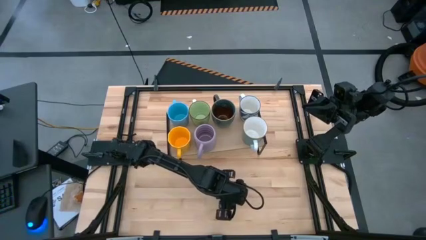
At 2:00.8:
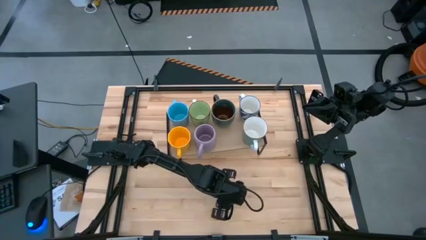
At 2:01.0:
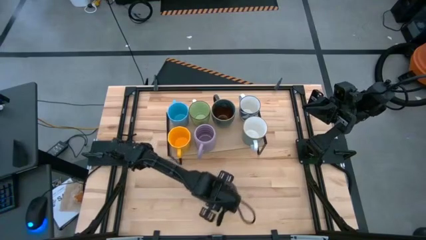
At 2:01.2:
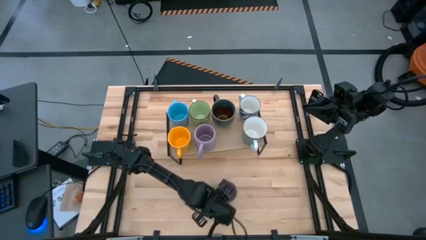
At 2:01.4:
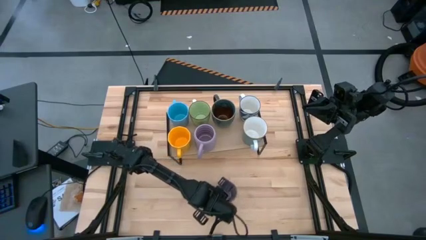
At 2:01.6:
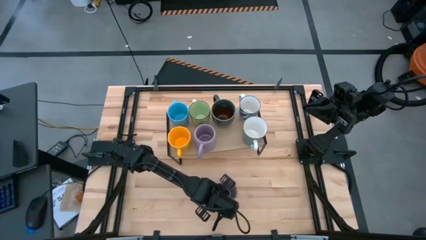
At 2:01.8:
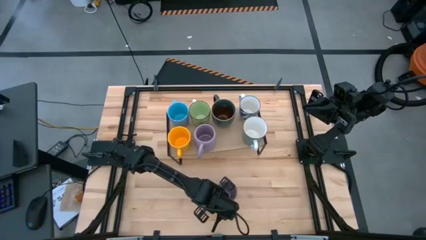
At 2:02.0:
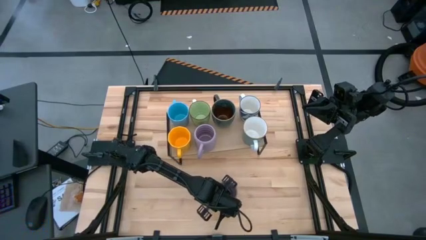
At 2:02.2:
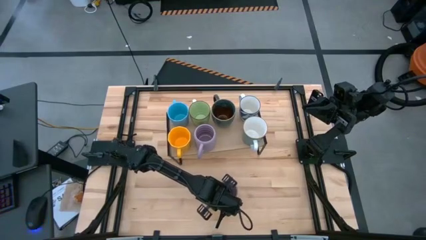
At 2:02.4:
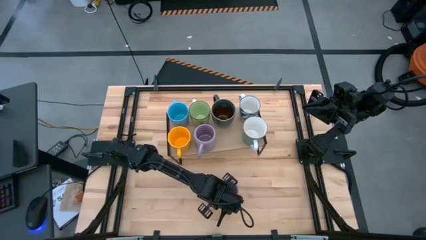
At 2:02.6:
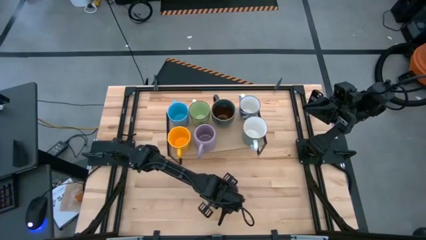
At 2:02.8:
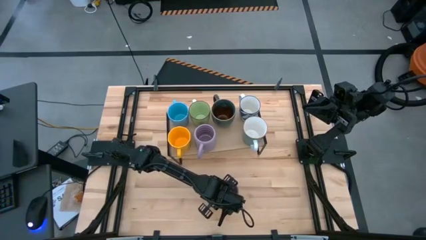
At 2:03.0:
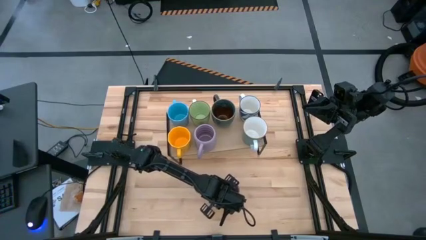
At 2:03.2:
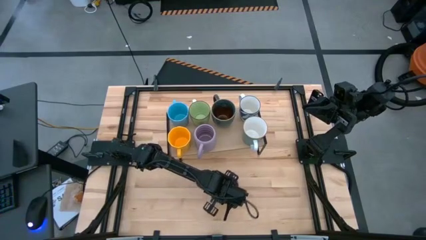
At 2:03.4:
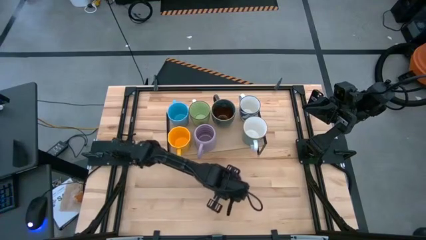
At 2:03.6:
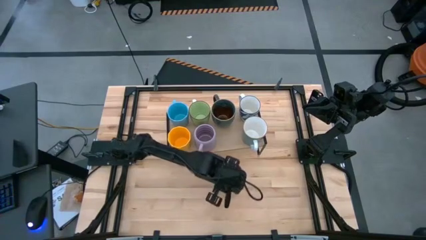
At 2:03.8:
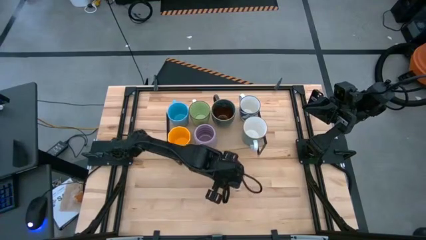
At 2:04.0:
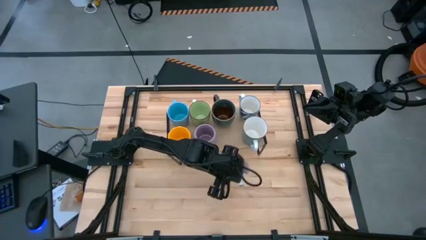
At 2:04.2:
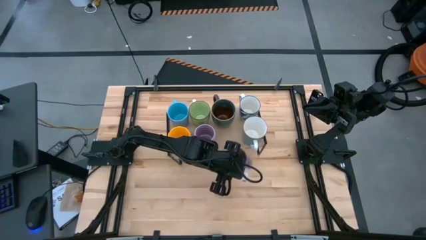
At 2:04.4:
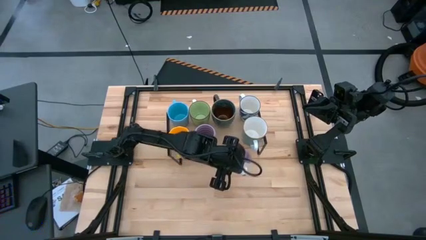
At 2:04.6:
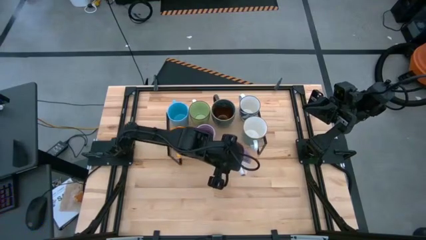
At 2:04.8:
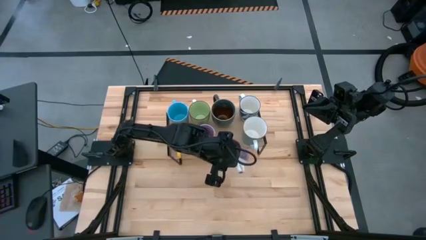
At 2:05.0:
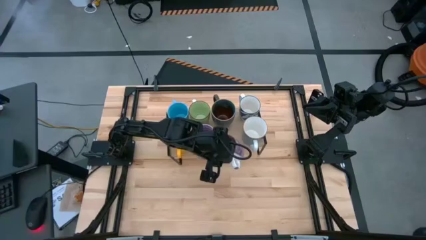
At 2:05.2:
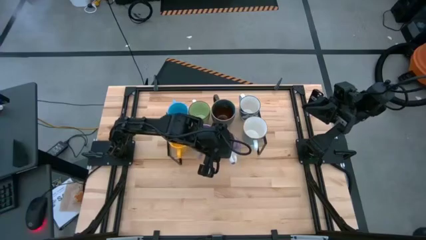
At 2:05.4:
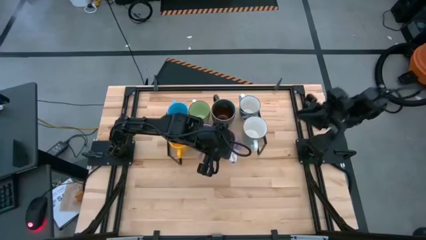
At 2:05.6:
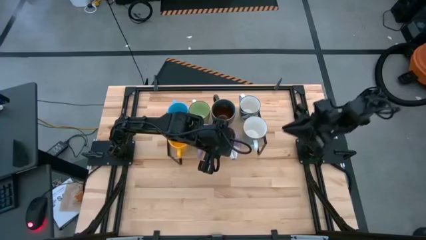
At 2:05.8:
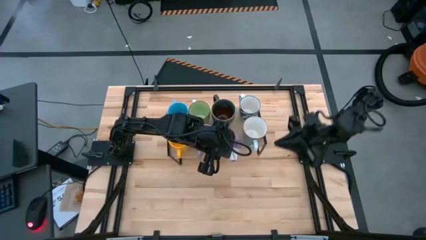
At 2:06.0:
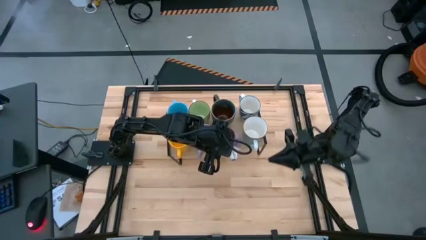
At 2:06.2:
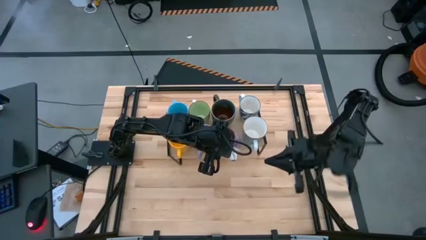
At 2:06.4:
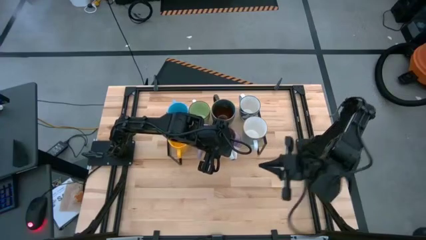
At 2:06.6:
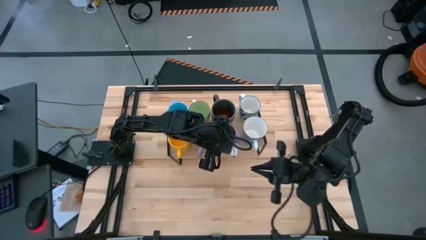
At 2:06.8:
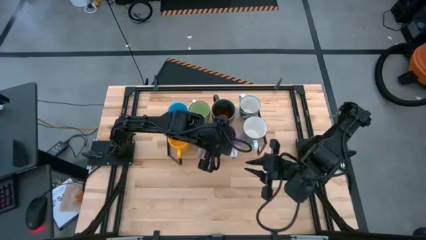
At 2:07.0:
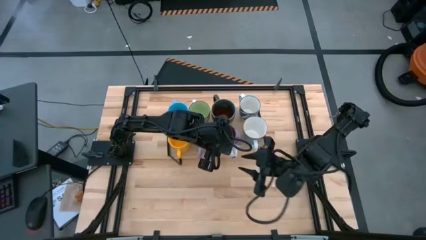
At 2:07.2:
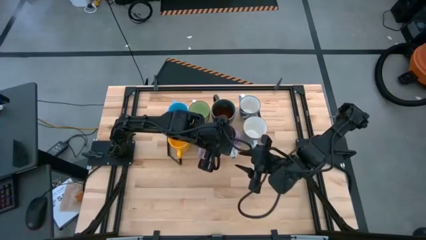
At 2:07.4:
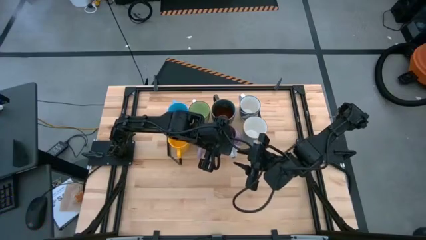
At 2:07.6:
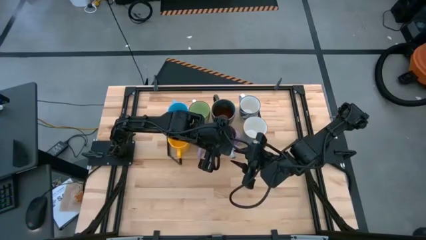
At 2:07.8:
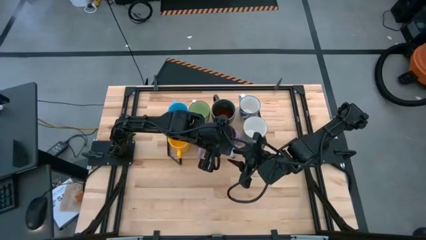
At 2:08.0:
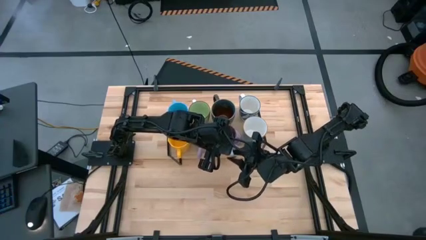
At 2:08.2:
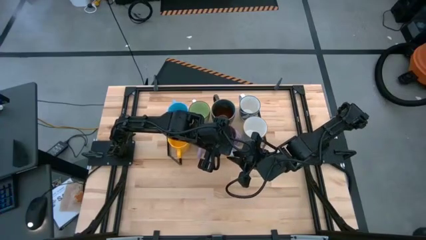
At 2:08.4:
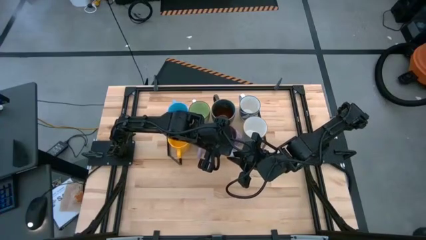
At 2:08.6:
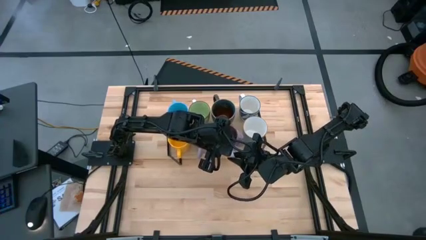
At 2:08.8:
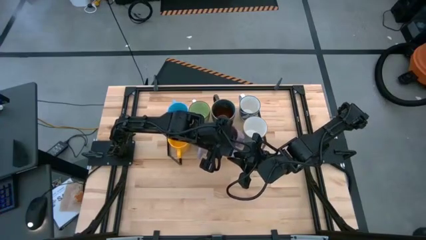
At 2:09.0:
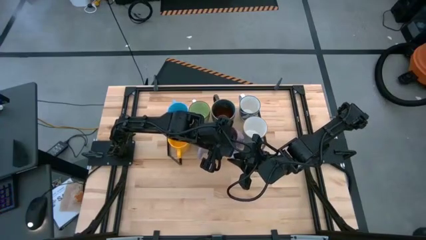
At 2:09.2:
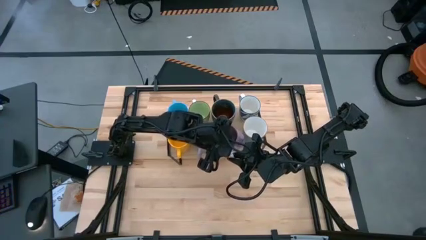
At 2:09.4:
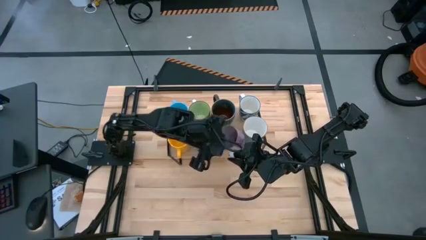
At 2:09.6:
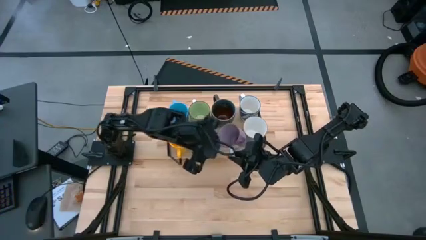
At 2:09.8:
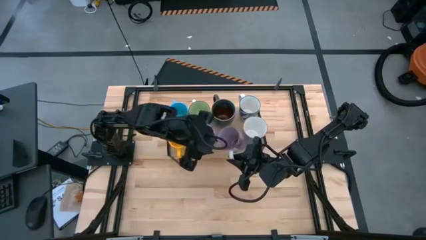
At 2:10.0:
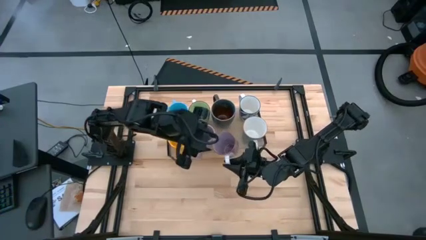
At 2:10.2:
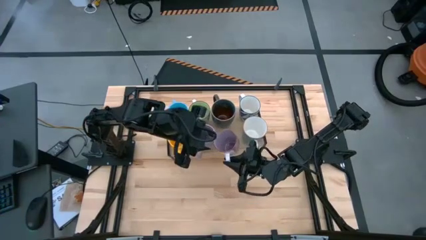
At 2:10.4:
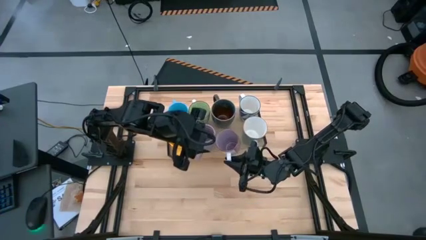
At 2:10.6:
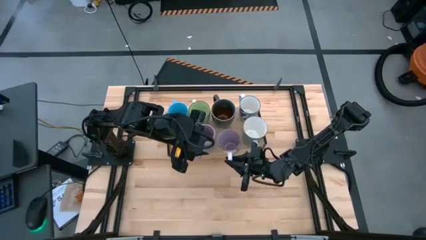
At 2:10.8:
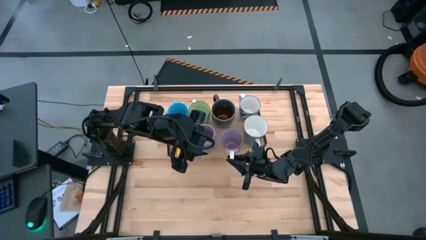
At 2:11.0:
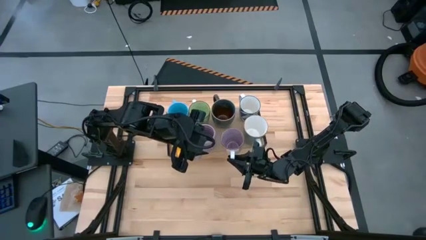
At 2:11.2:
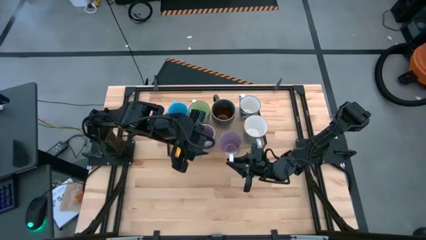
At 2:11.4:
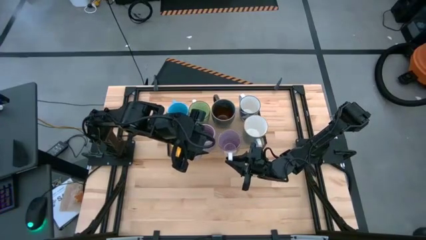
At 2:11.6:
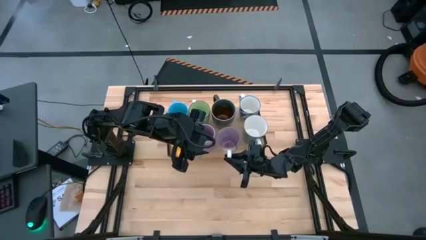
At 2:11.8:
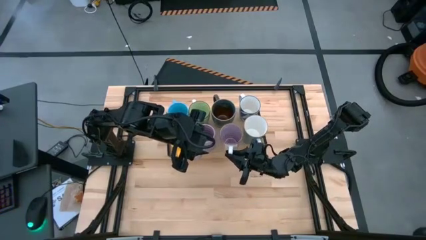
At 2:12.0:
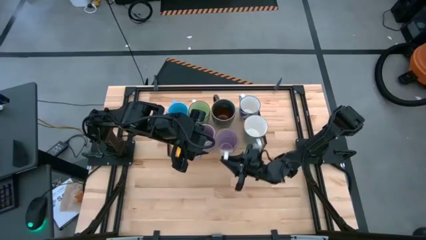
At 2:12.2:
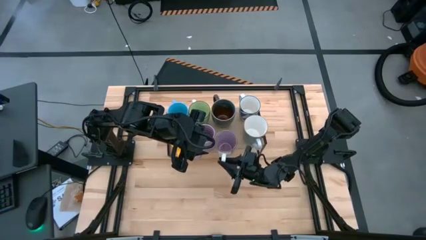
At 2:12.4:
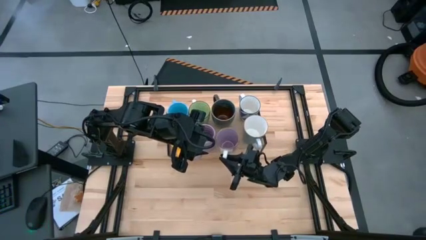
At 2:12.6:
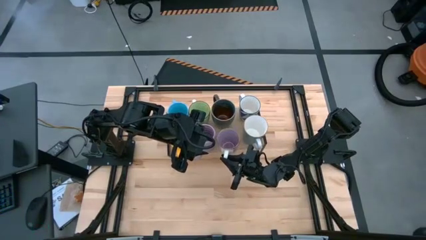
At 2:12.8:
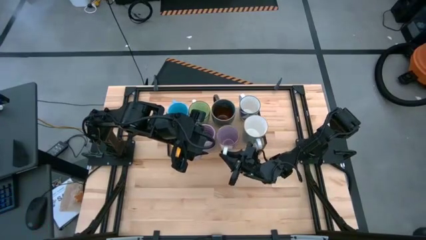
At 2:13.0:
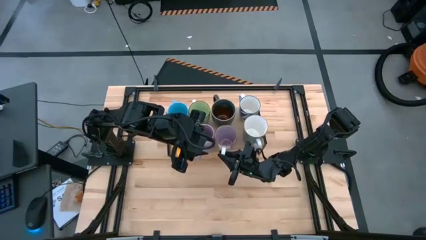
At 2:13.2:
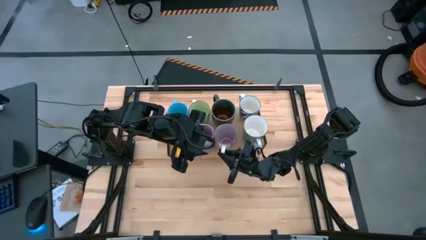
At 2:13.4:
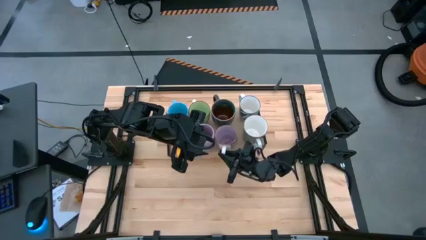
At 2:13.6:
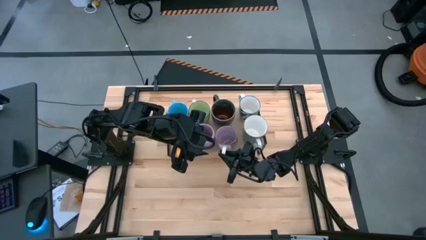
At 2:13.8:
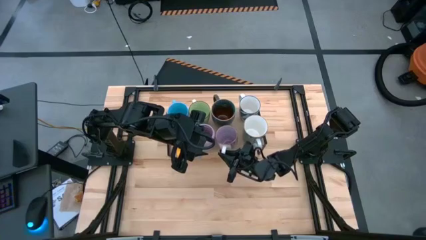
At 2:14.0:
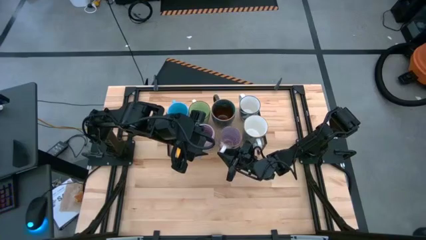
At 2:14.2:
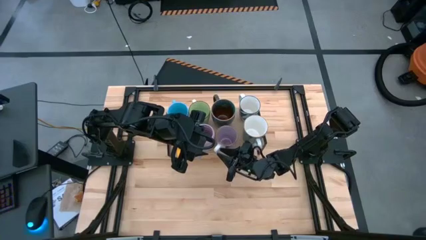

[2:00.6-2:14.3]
Task: Place coffee mugs
Put the right purple white cup on the shelf

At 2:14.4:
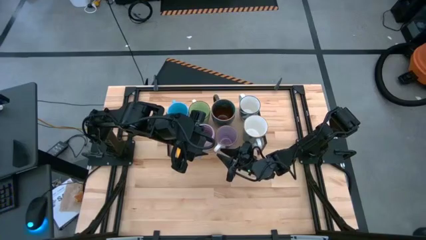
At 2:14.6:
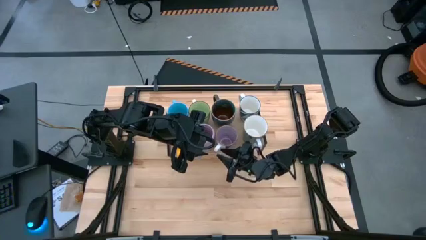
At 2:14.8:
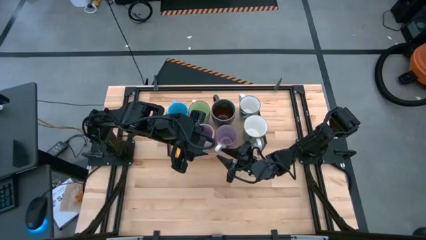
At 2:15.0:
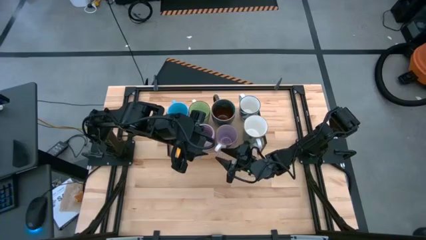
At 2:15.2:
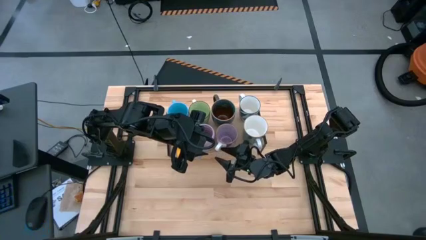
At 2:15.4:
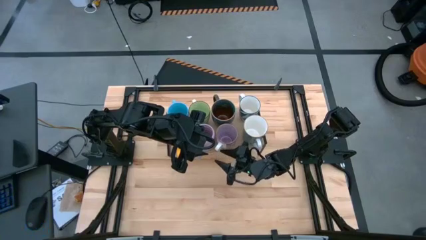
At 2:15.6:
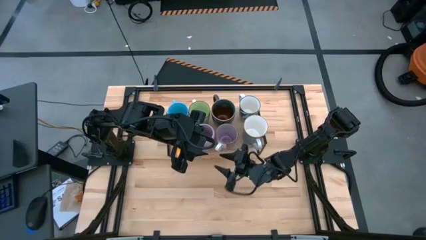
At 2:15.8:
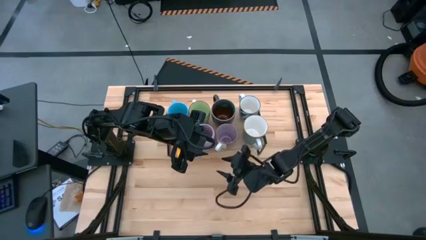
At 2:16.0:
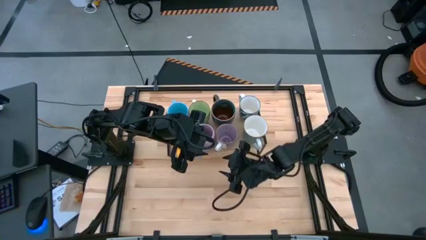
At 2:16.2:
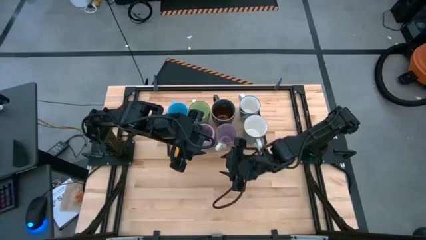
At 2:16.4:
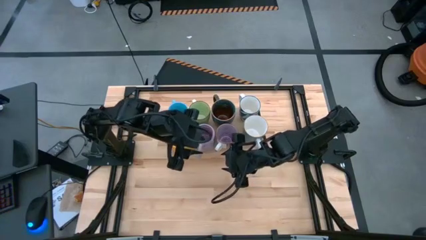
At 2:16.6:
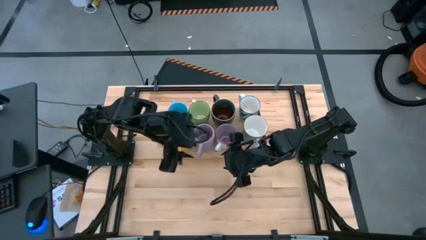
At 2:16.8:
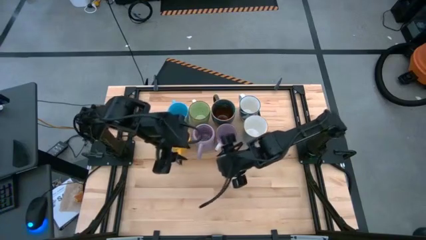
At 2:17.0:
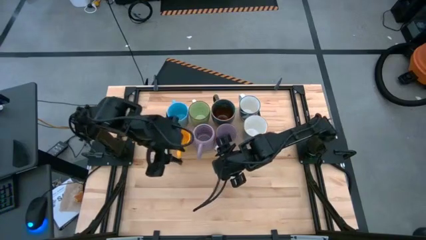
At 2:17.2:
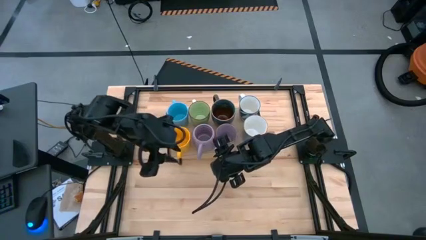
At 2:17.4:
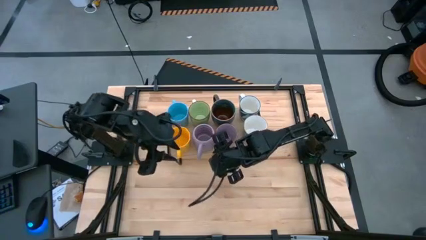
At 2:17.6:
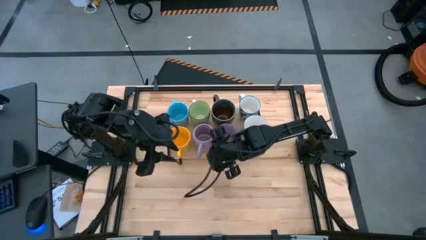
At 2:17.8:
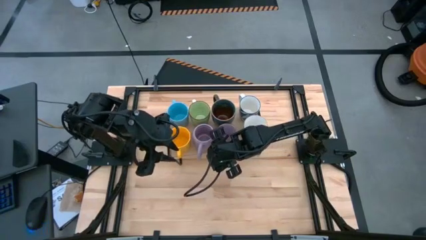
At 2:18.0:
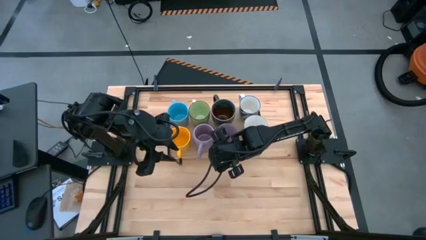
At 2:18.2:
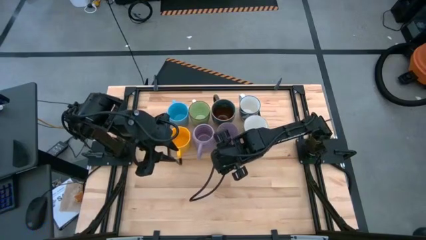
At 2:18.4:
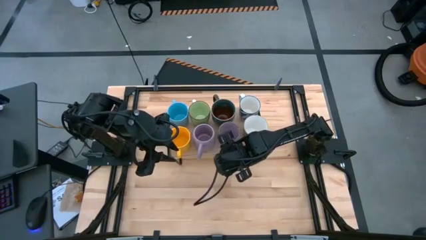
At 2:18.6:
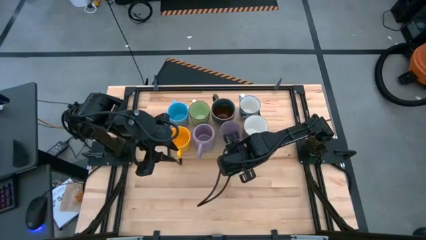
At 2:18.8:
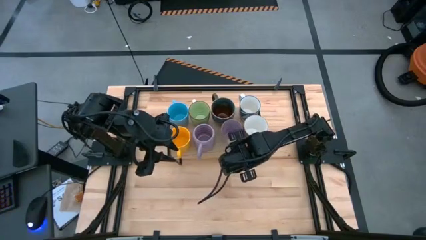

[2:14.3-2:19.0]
Adjust the purple white mug on the shelf
